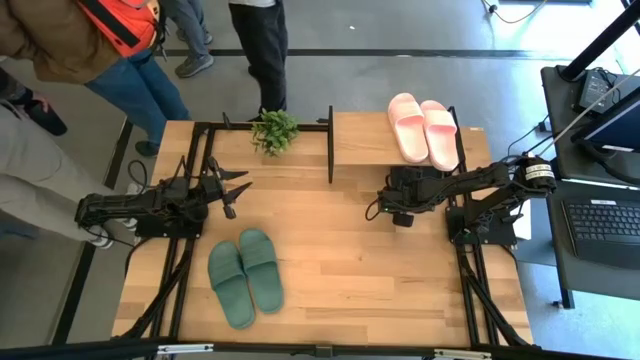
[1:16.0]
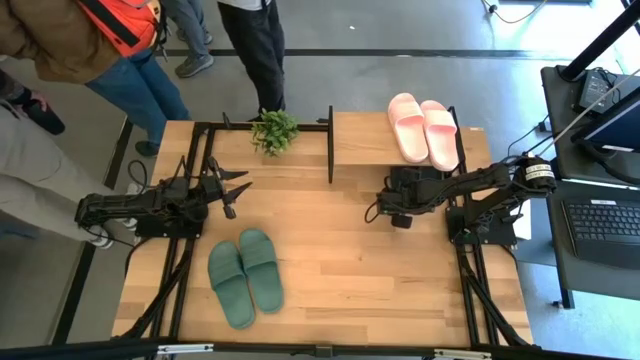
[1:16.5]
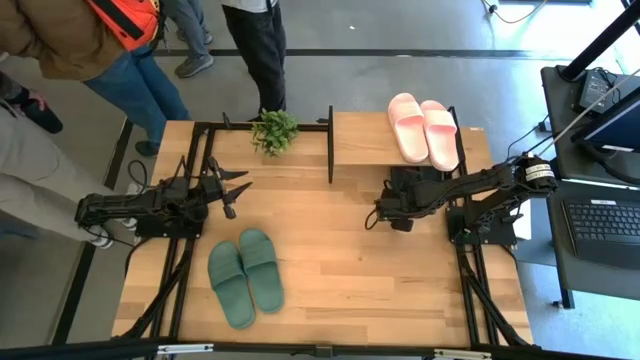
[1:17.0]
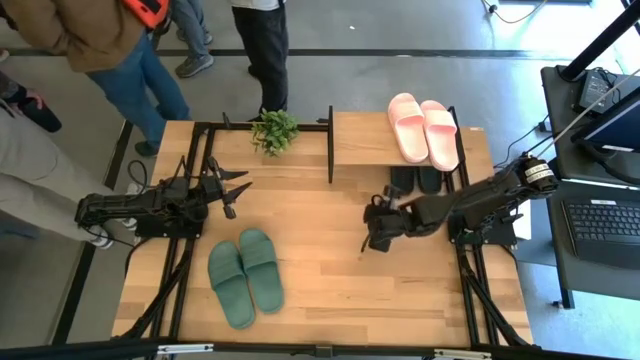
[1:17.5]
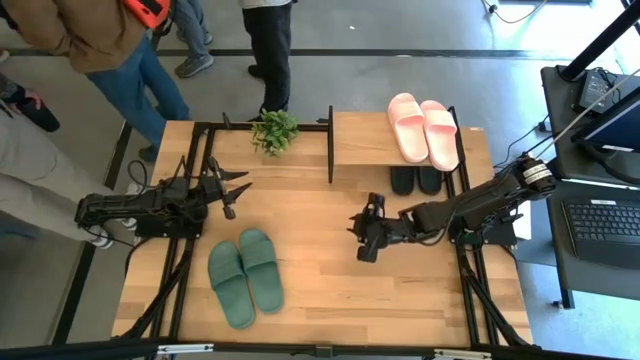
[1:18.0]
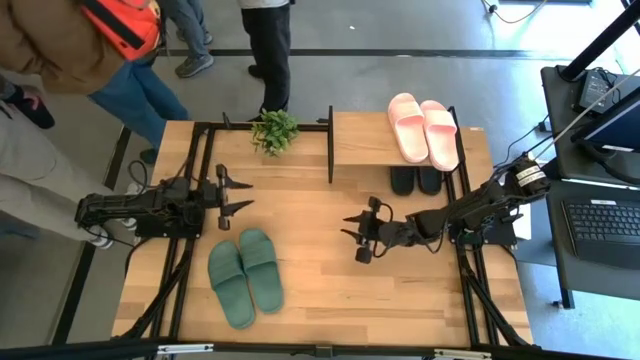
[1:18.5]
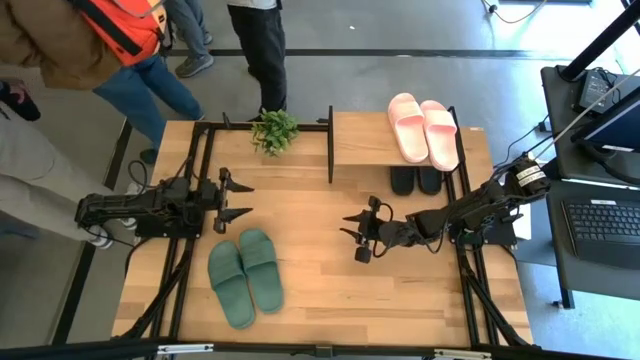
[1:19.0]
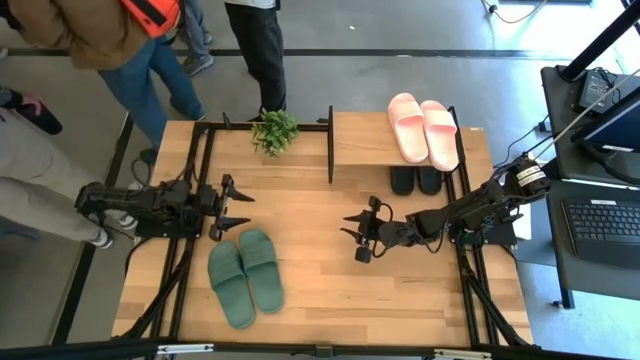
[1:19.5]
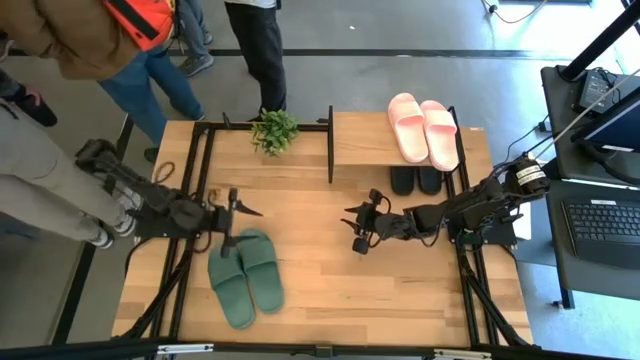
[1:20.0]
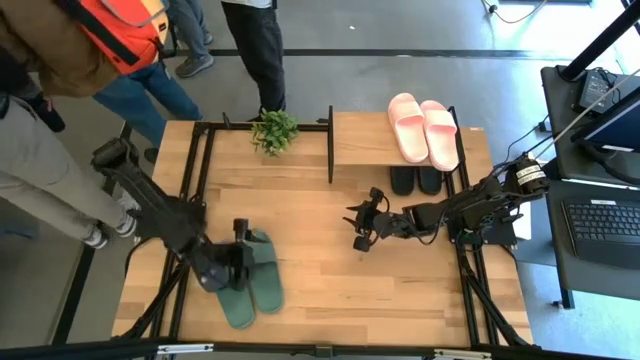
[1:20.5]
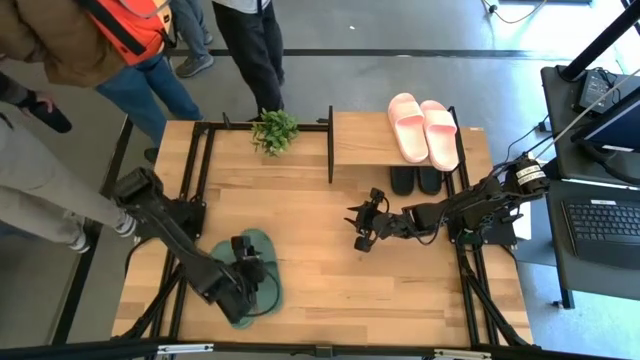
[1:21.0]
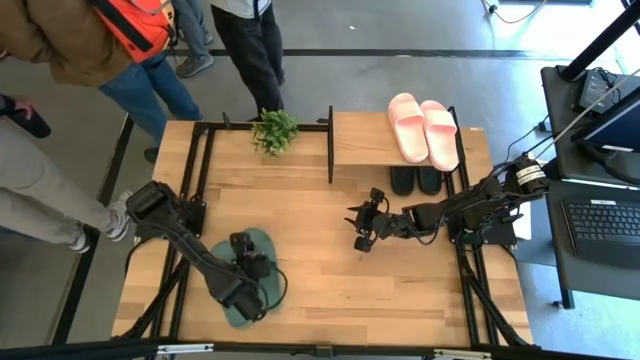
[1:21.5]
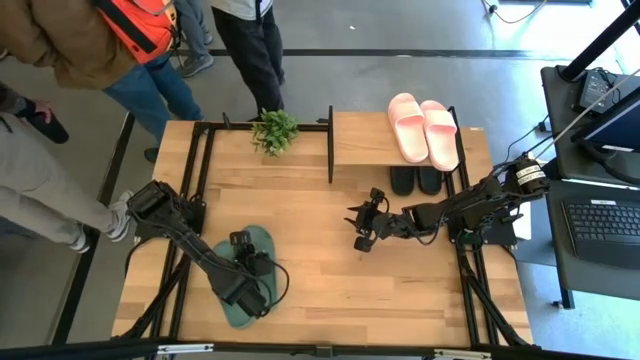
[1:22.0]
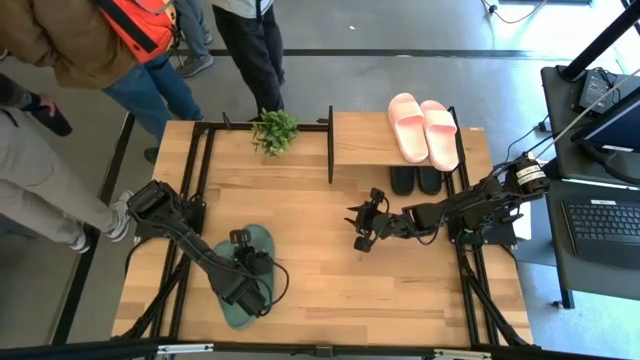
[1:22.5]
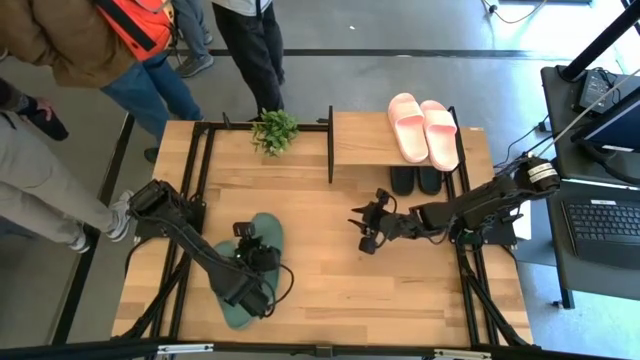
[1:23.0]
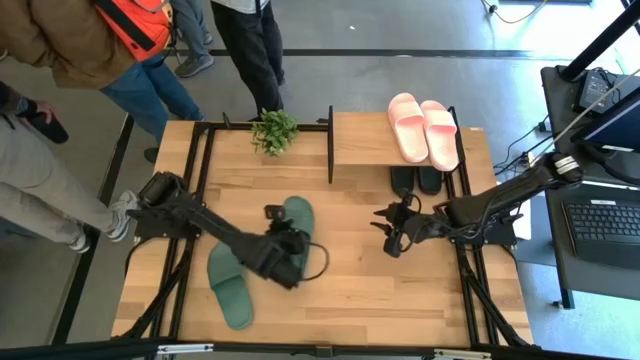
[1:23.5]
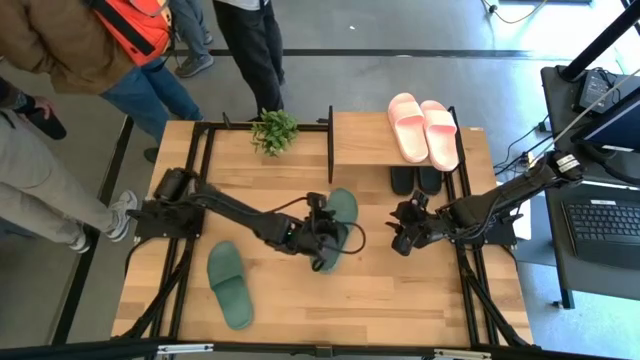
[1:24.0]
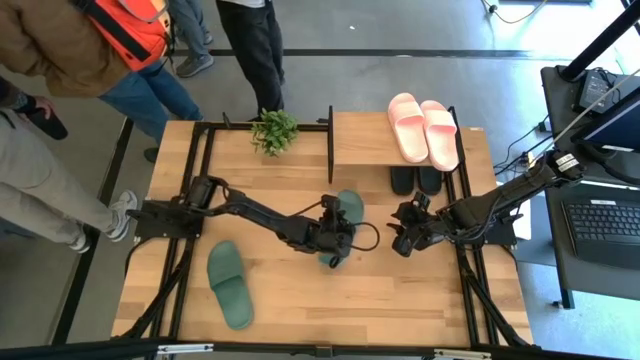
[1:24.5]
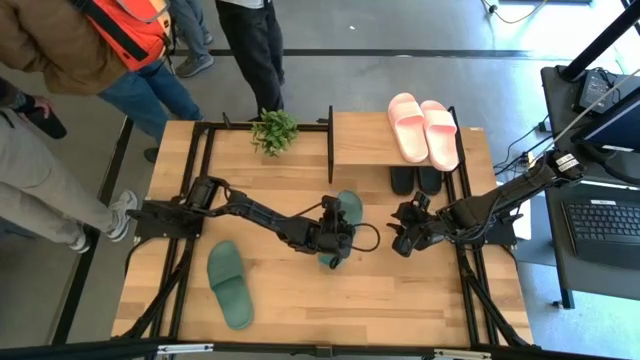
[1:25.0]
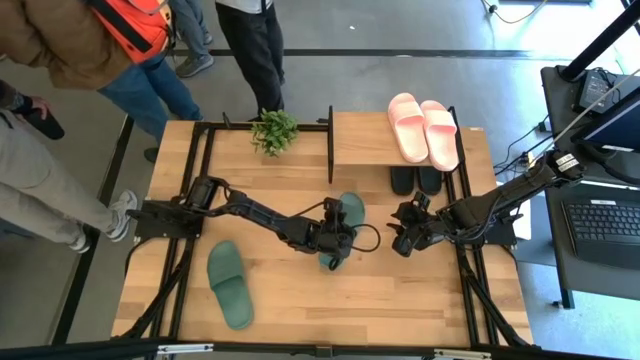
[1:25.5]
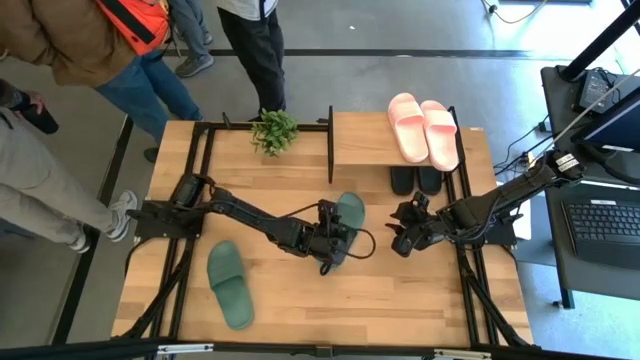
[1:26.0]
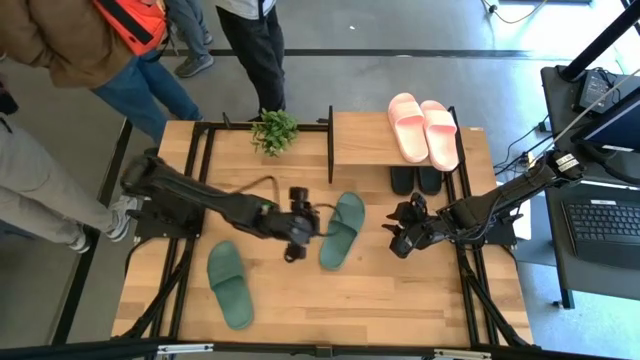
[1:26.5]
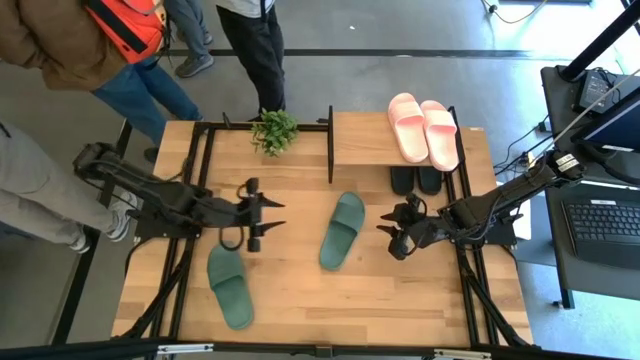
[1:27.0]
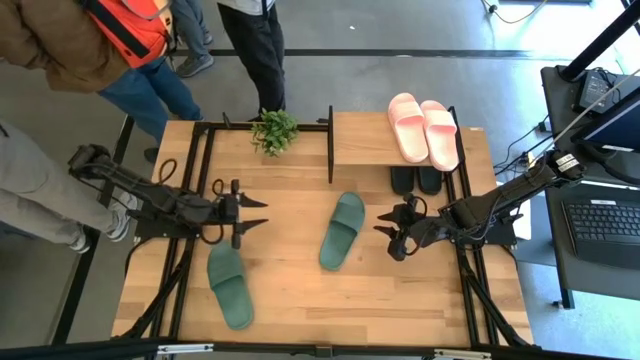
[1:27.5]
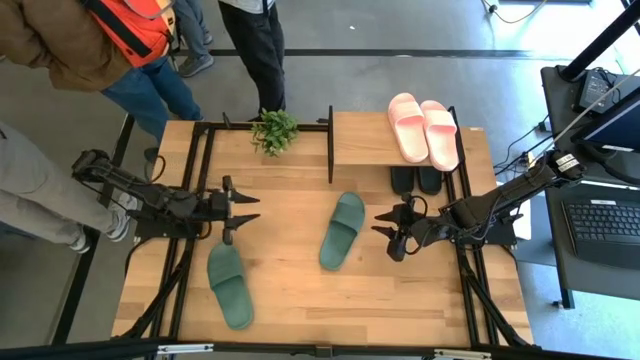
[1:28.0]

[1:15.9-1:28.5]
Task: Pick and place slides into the shelf
Put the right green slide under the shelf

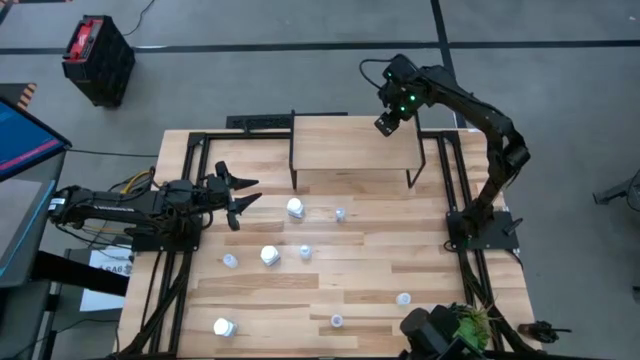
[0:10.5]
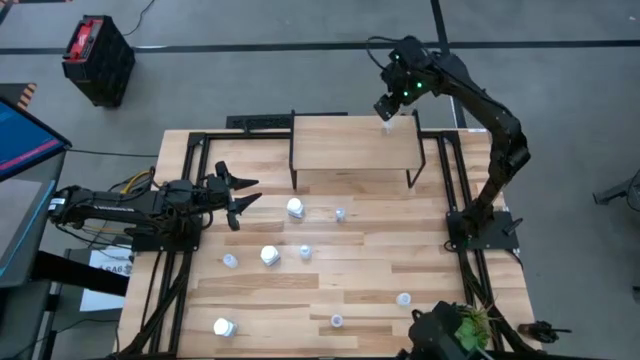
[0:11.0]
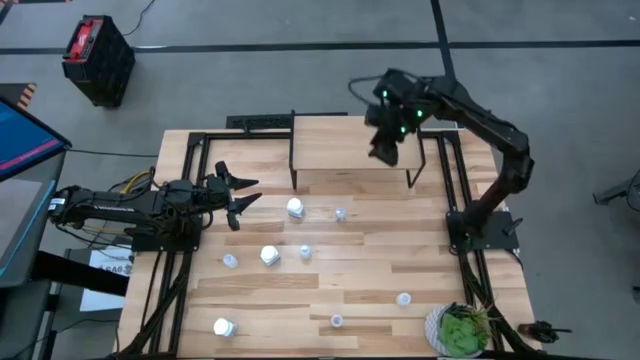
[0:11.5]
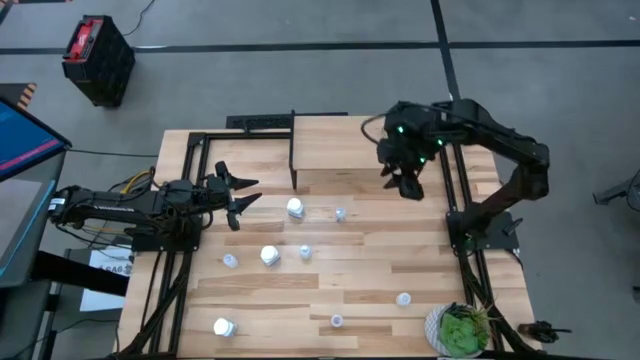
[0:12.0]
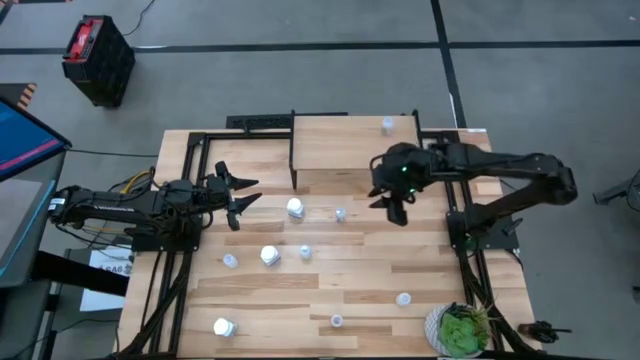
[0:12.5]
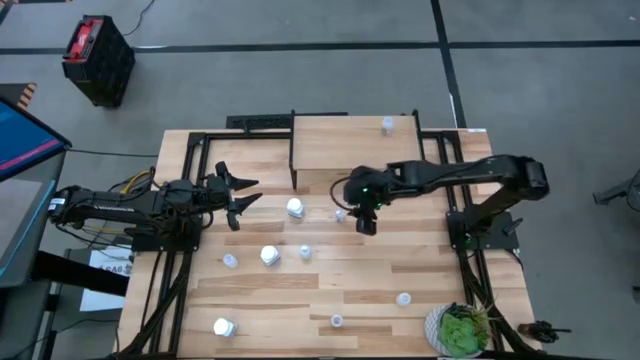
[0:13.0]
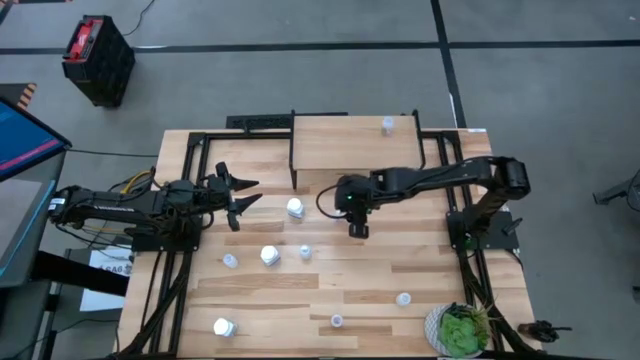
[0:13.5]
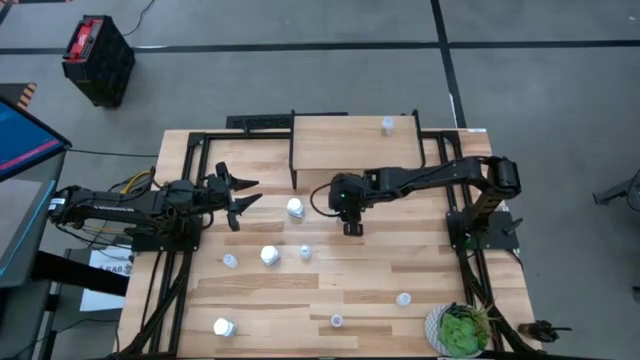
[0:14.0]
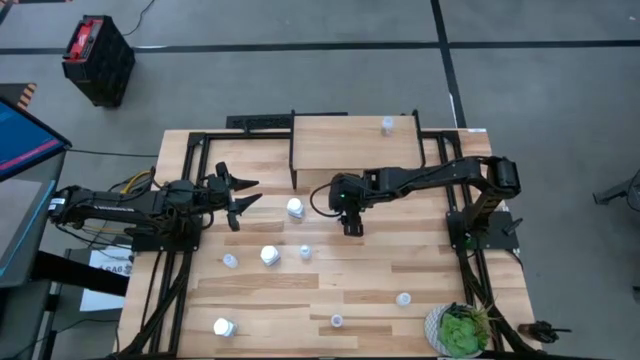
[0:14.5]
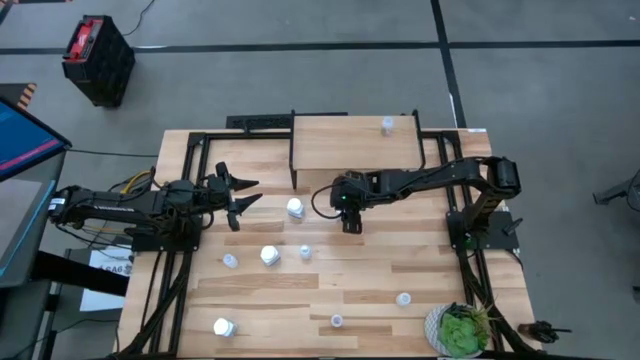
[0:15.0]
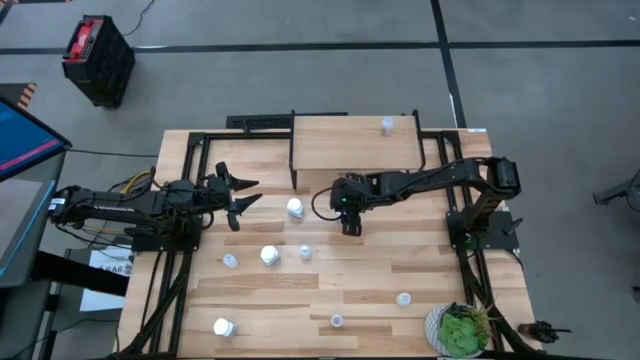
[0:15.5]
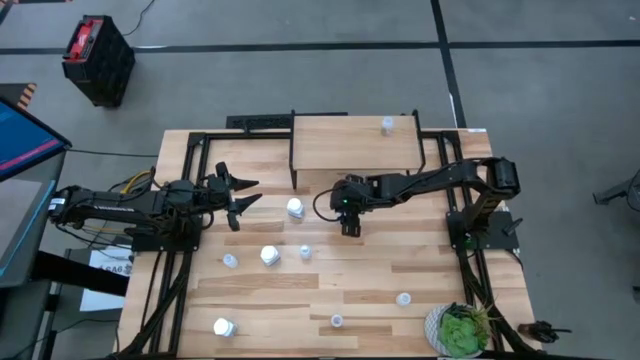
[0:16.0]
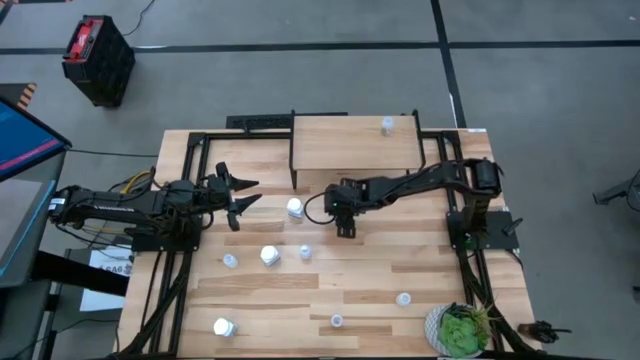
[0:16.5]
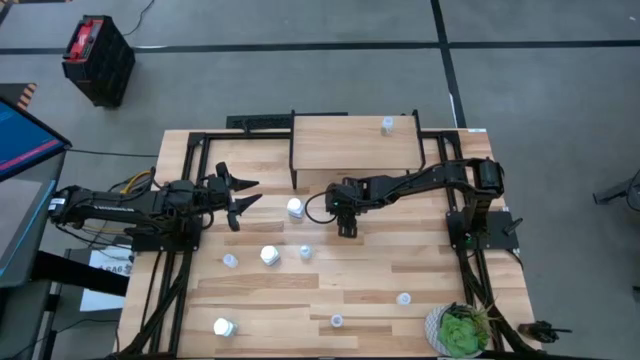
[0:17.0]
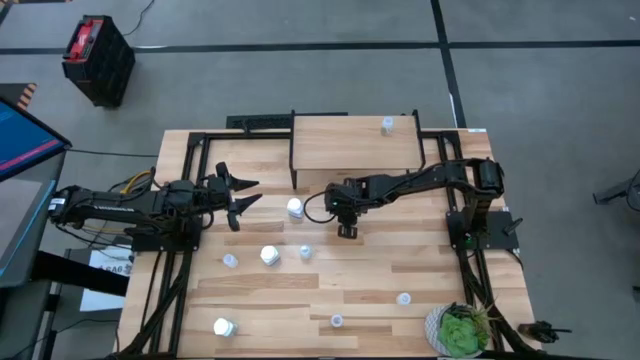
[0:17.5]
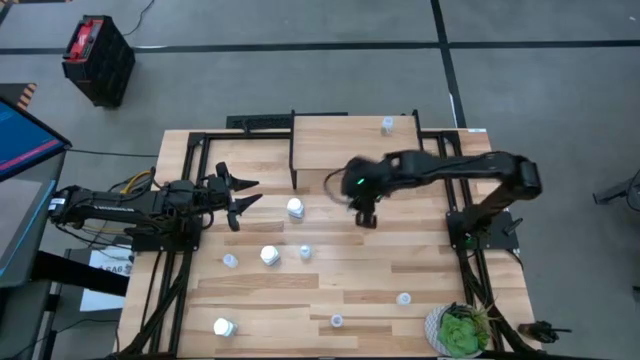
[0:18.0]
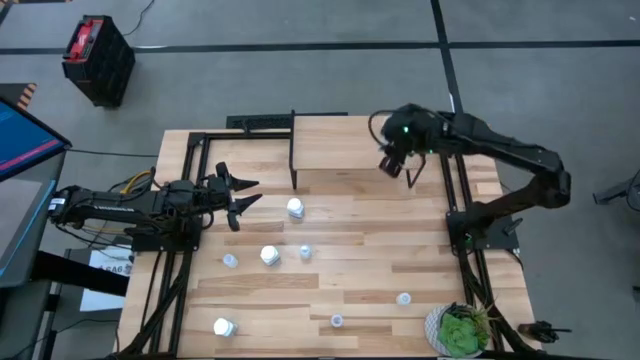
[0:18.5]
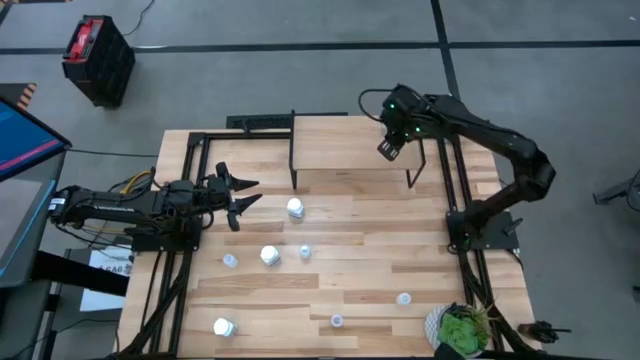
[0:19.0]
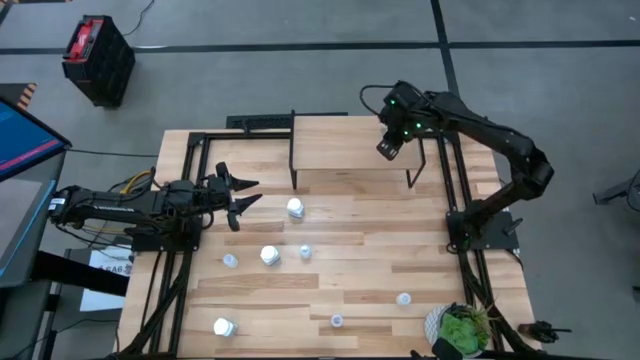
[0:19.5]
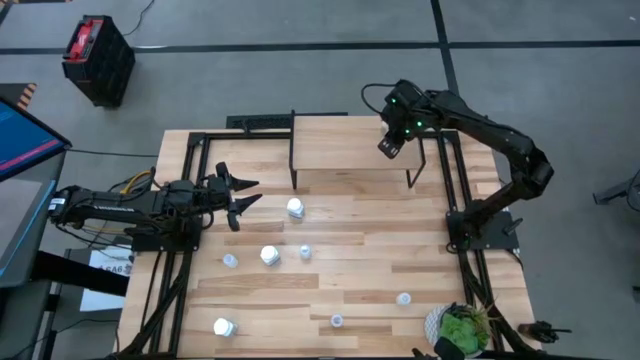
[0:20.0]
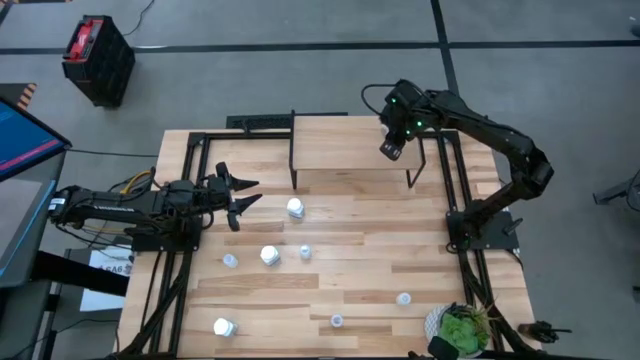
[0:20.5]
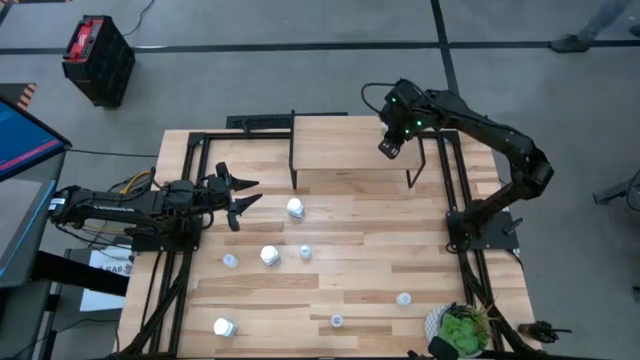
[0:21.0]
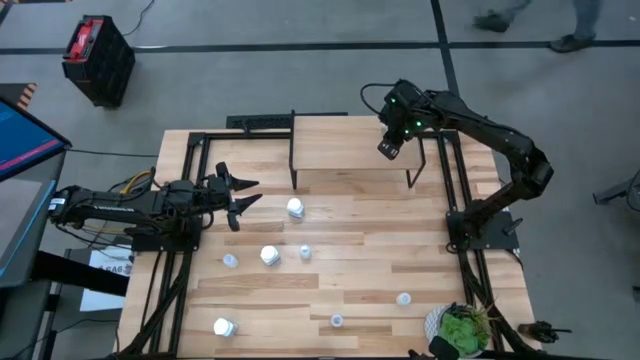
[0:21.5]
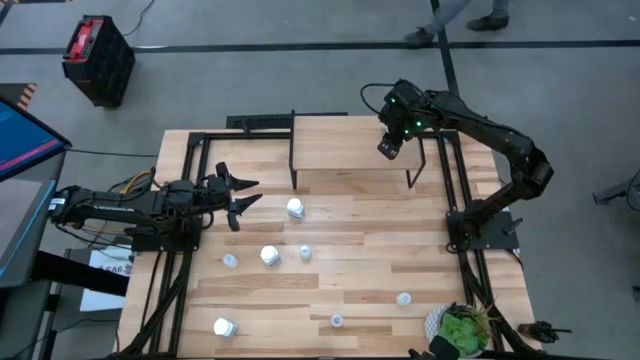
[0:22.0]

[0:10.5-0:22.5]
Task: Pick and place medicine bottles onto shelf by color
Put the top transparent medicine bottle onto the right side of the shelf
